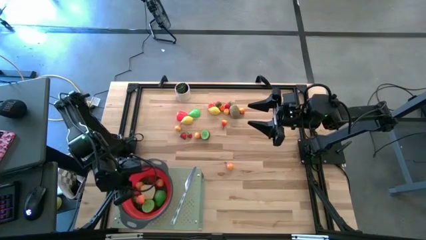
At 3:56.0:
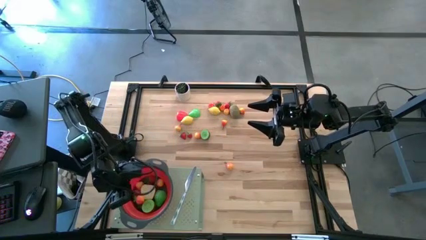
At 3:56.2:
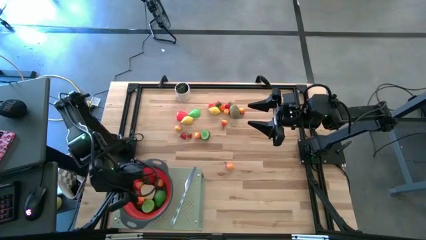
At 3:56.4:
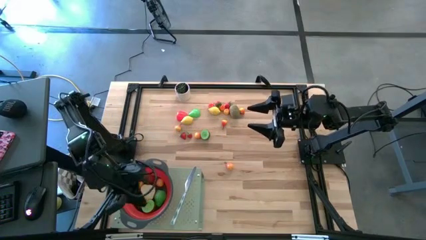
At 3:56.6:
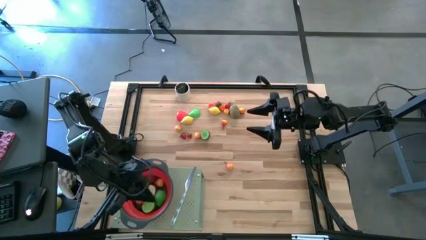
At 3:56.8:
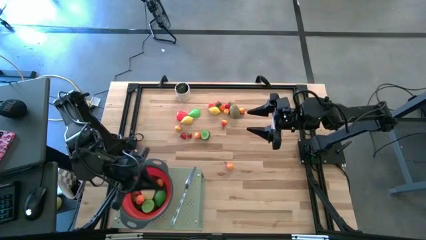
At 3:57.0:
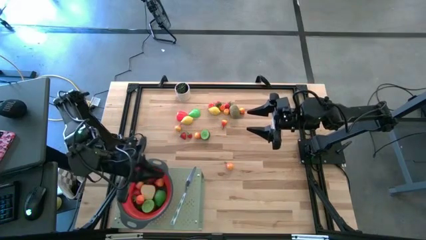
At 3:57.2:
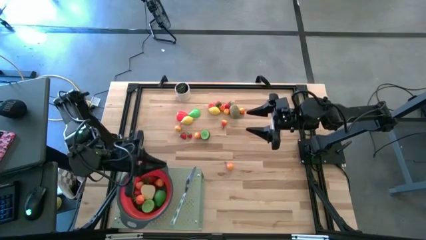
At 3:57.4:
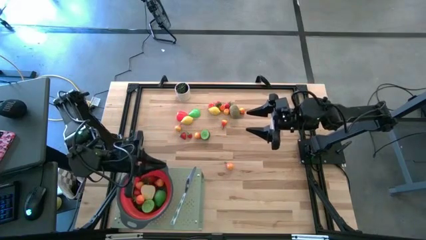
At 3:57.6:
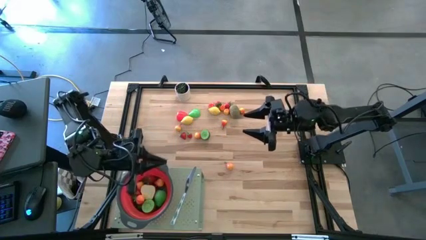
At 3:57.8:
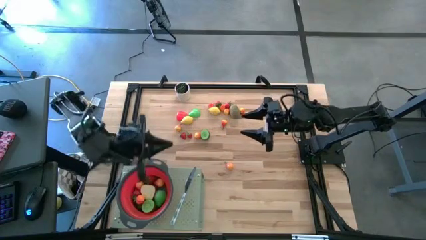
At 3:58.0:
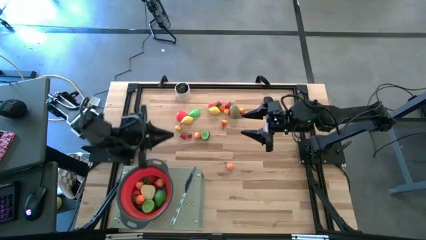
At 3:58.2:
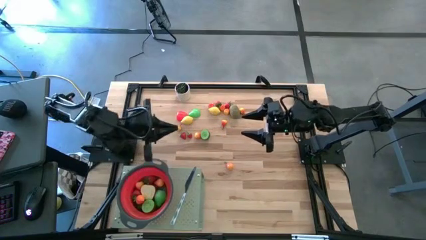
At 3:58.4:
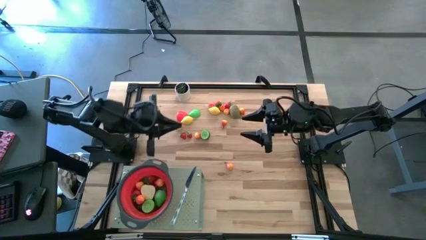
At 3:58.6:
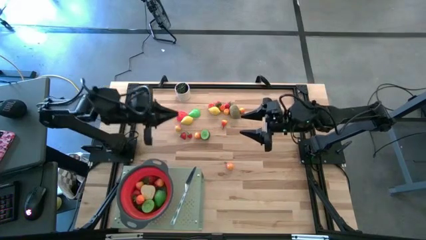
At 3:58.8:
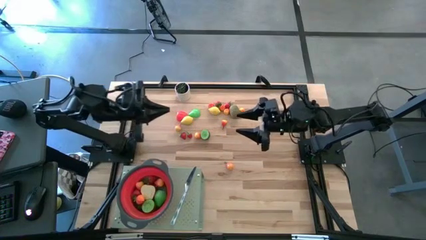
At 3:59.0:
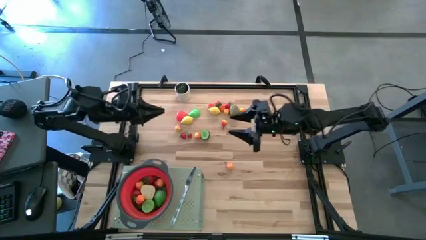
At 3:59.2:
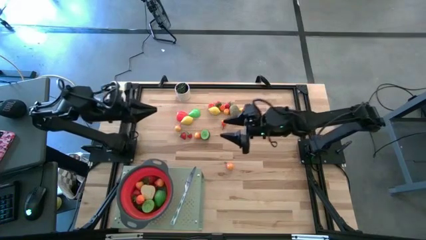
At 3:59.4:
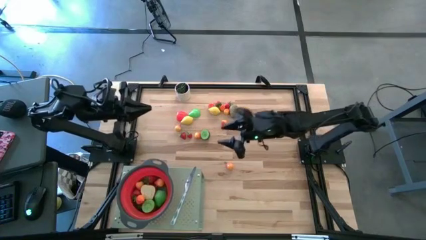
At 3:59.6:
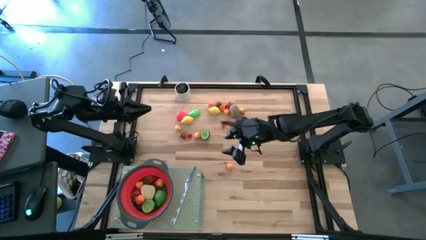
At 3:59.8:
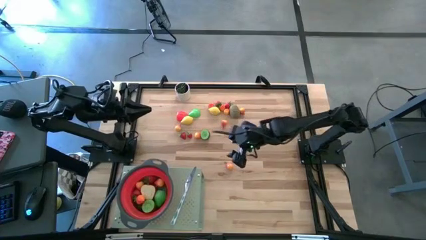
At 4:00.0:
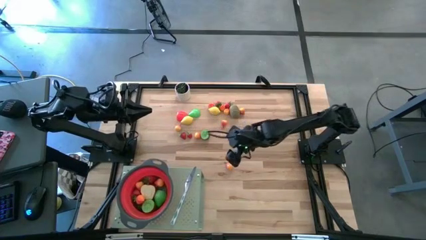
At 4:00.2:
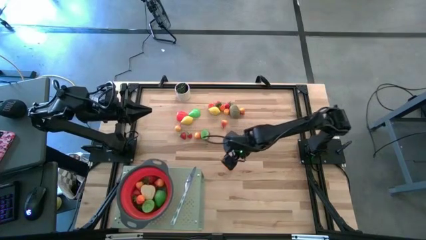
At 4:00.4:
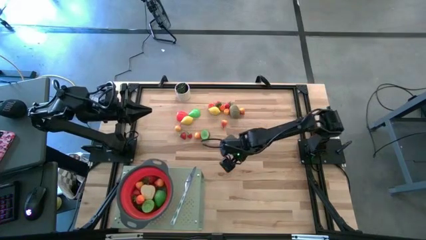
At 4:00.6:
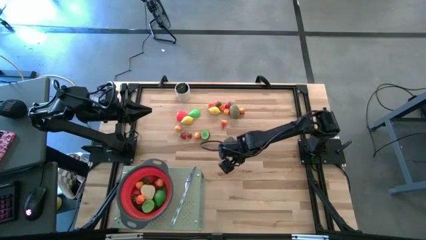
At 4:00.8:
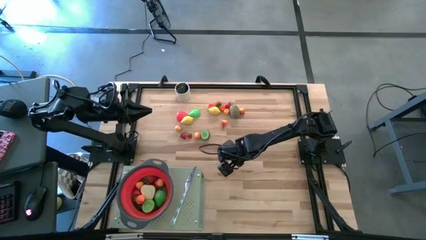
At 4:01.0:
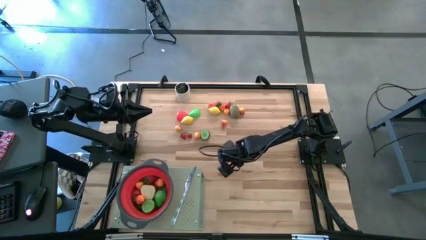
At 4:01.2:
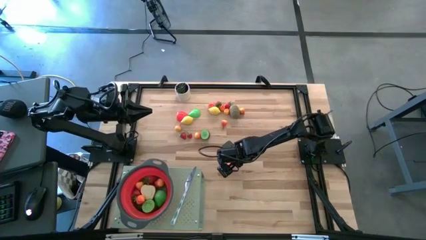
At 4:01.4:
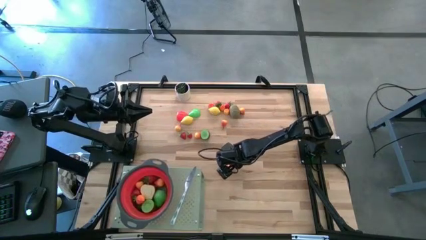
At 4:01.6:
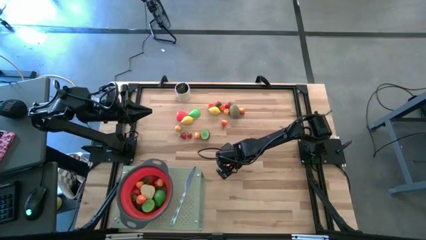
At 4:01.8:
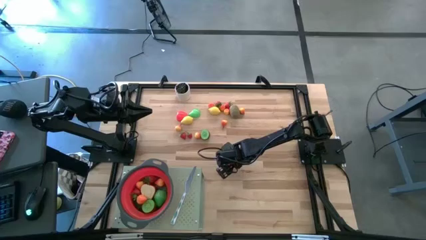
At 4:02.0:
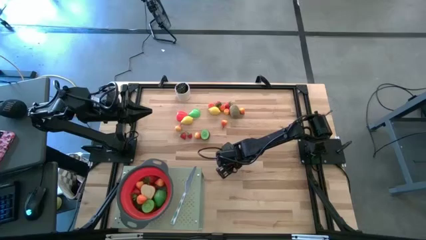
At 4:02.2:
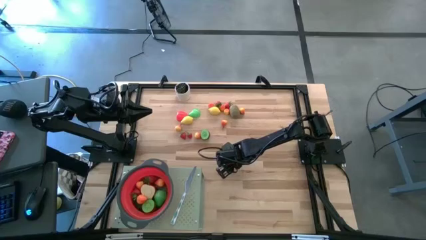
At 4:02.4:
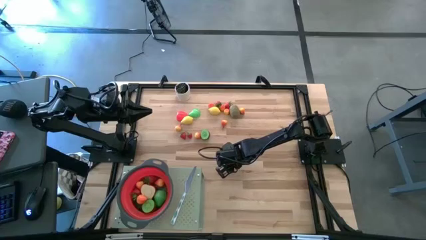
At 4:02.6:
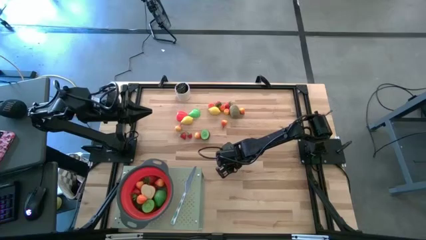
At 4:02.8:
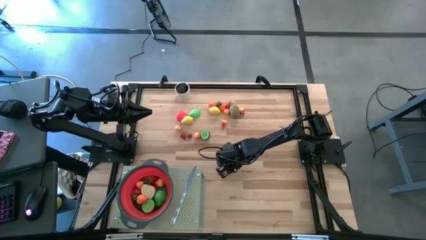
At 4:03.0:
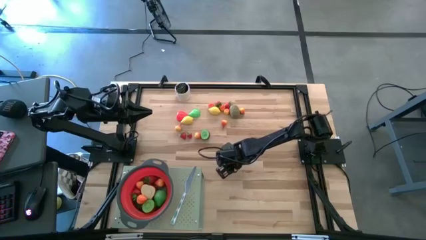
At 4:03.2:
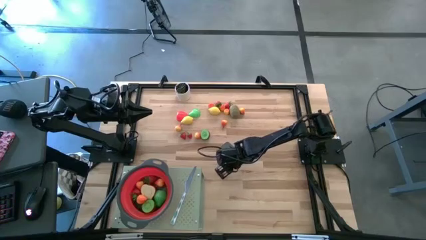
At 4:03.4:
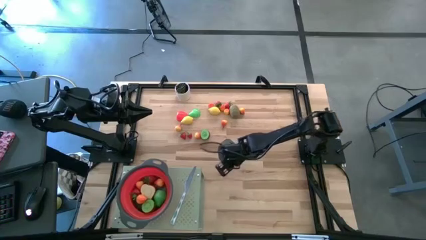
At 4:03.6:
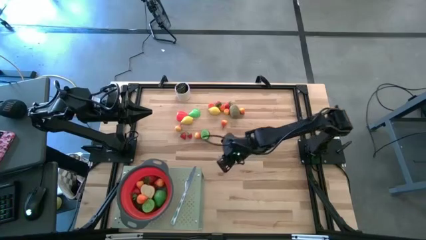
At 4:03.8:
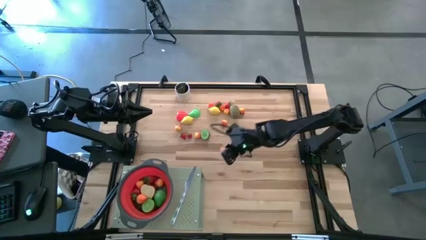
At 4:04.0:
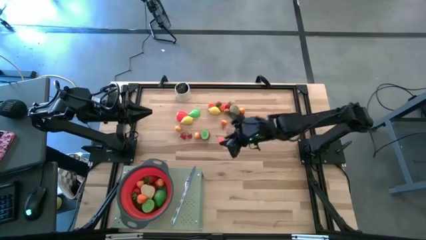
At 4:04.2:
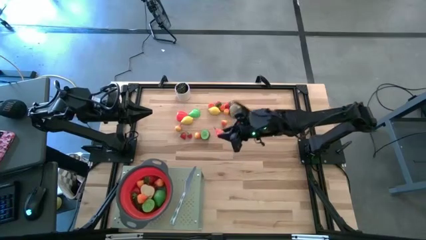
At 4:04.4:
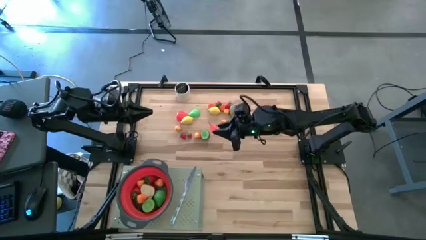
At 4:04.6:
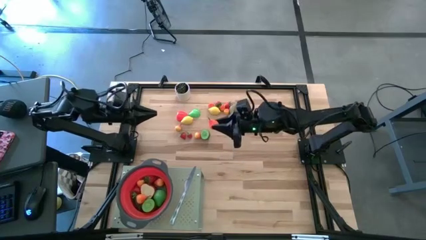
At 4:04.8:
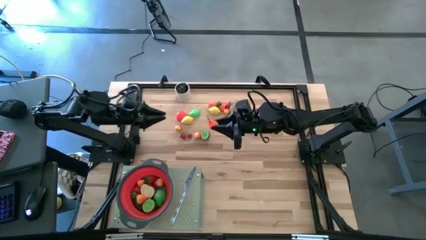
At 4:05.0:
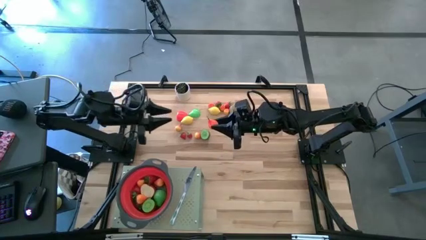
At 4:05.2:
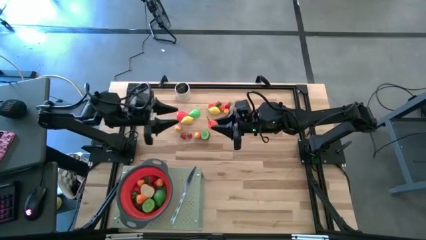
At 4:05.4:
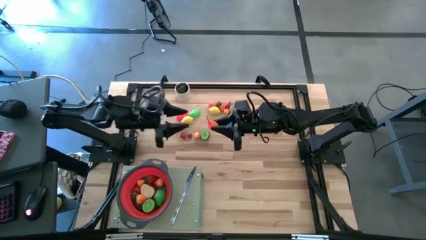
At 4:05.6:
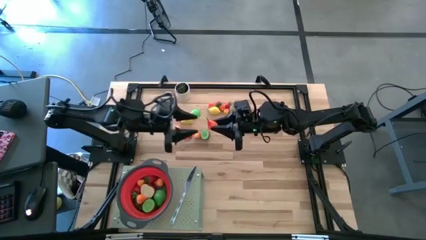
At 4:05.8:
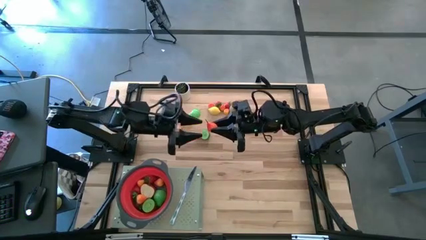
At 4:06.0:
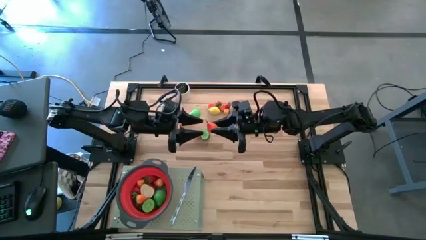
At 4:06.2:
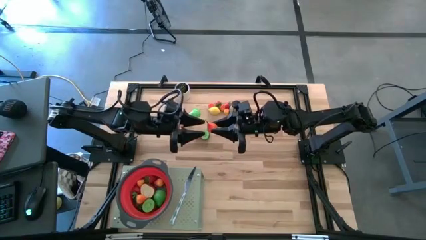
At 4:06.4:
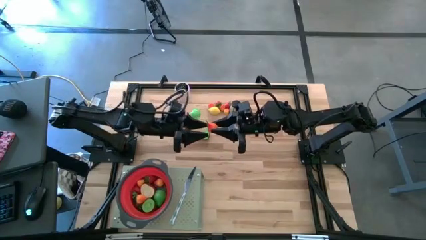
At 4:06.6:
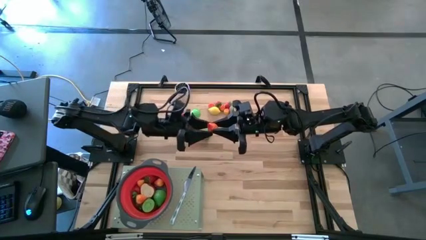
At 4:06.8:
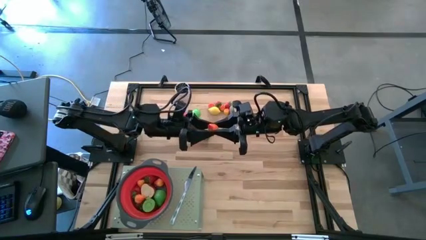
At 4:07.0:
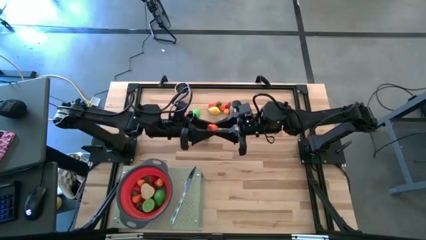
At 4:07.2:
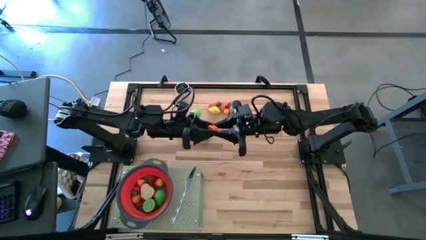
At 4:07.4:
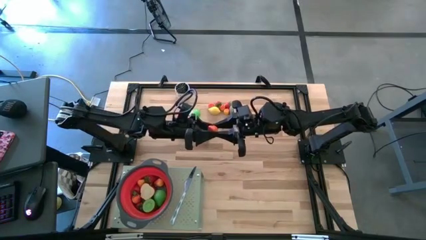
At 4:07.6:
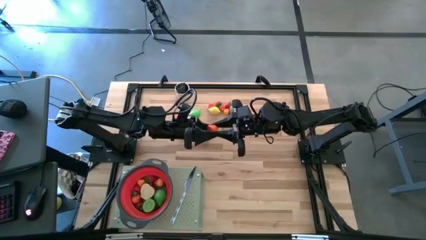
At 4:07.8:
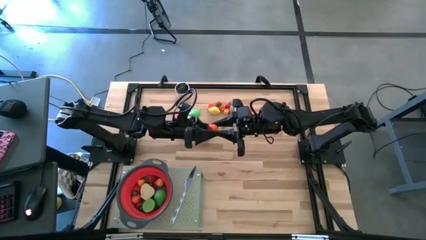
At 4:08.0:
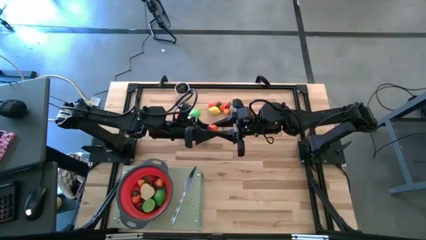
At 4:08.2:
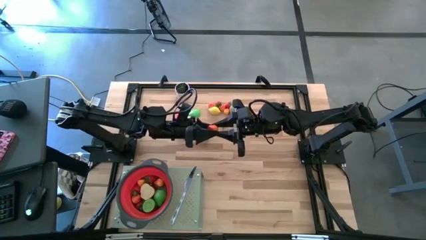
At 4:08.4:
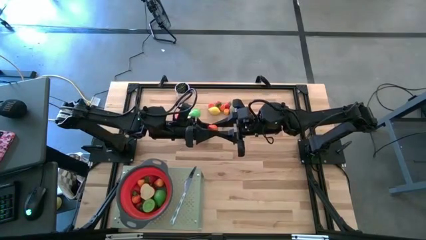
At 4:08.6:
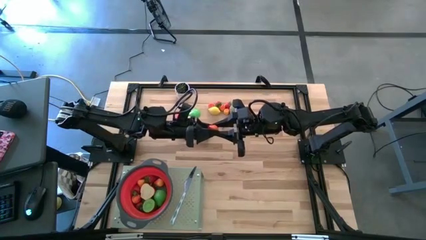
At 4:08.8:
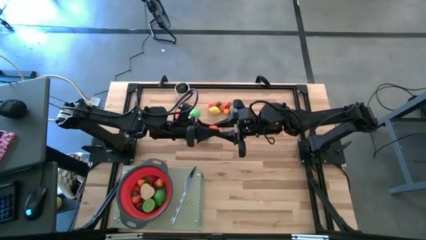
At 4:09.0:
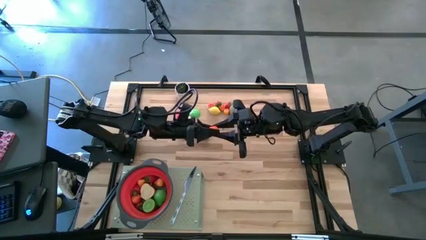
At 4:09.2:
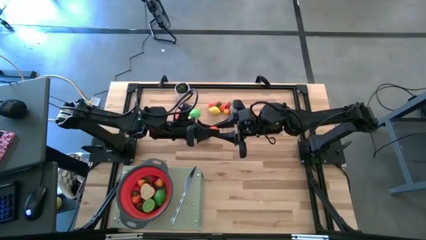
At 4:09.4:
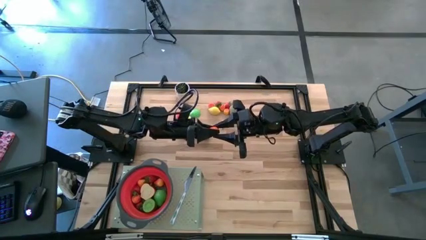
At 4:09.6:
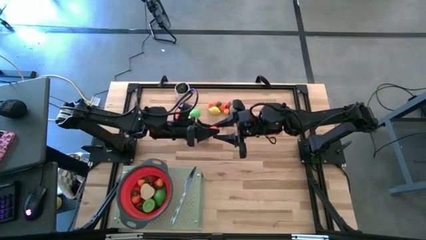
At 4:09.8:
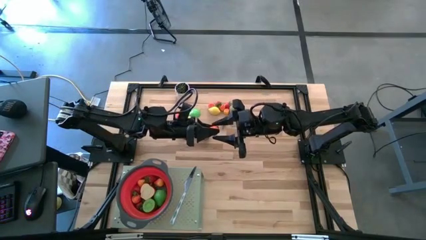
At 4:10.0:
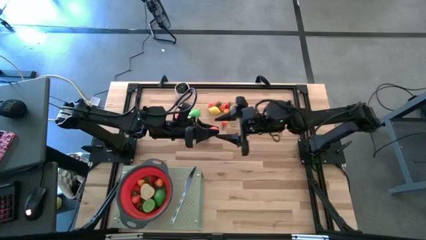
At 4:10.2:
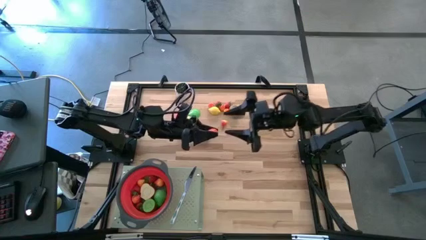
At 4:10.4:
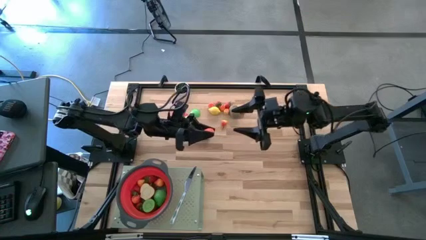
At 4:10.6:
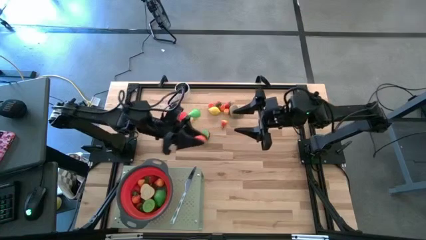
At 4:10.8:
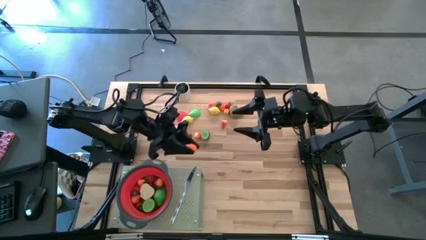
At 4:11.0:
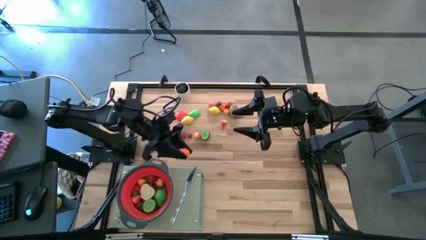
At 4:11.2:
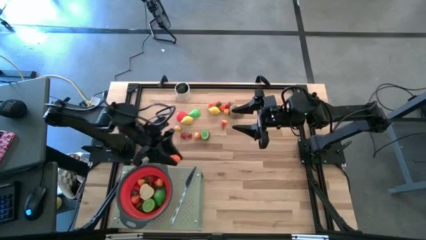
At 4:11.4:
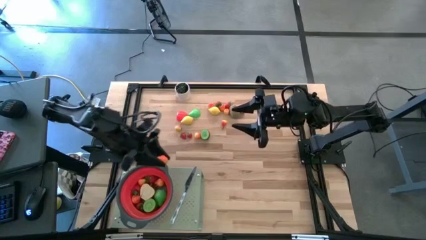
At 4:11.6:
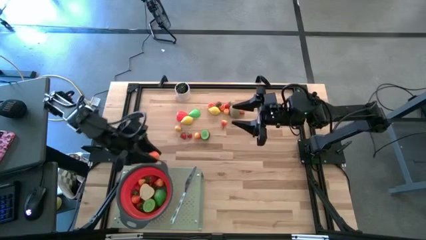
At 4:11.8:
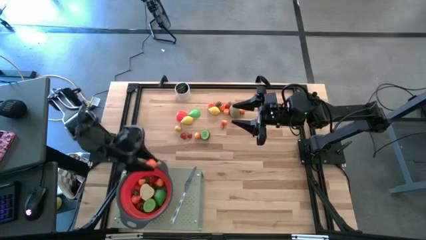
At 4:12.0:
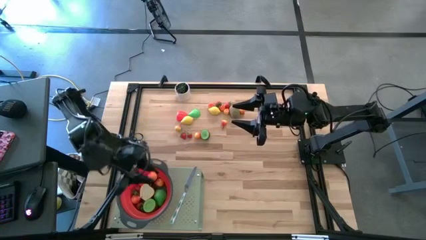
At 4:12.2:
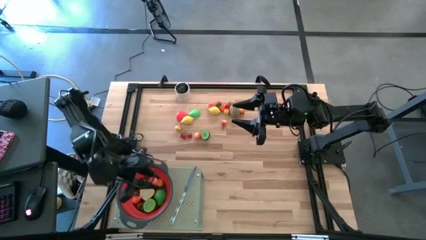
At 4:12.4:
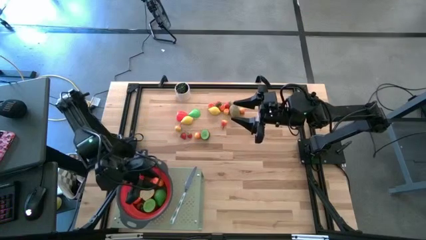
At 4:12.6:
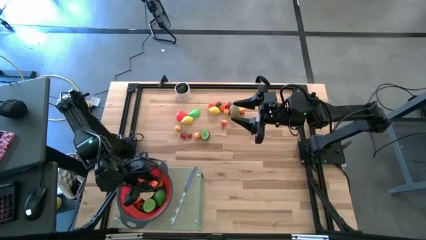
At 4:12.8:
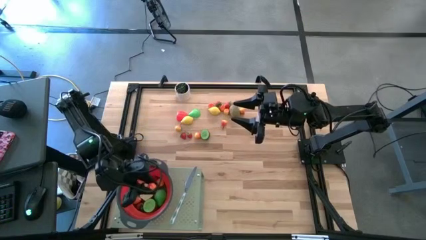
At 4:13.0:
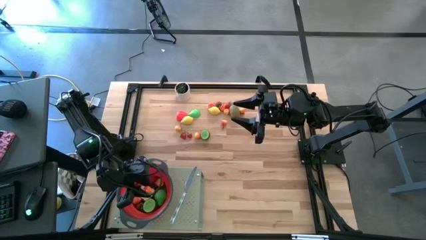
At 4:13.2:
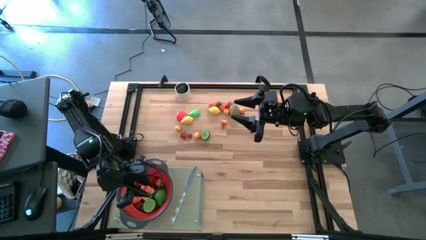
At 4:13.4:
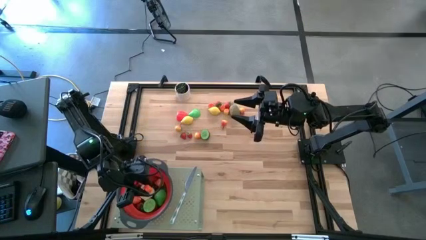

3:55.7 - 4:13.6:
Task: Pick & Place Fruit
Put the pear into the red strainer bowl on the shelf
